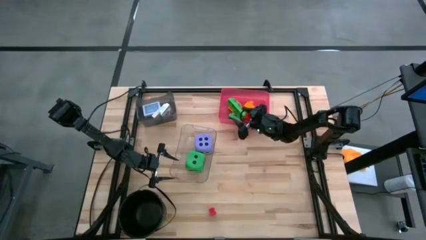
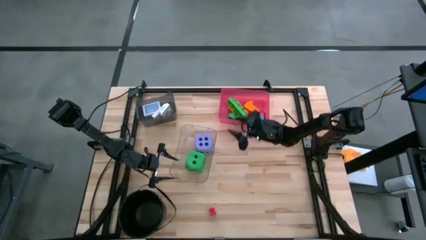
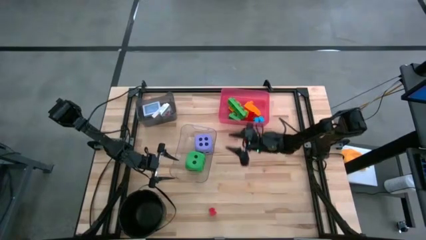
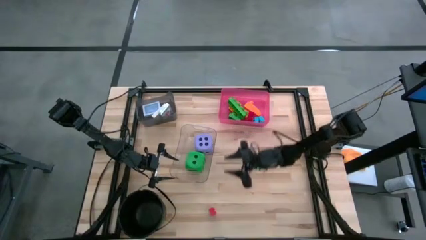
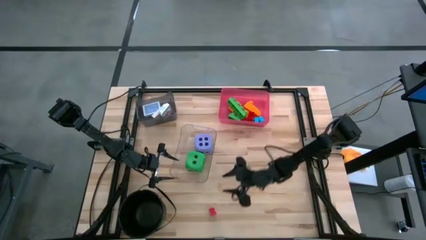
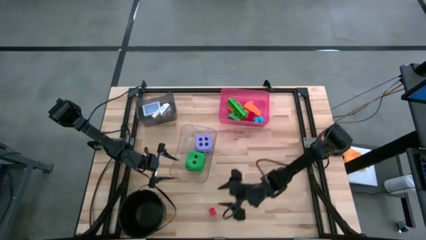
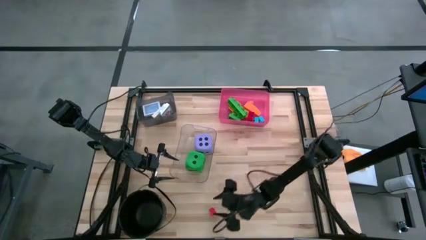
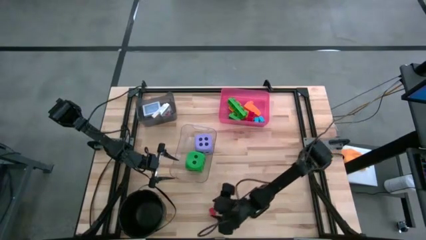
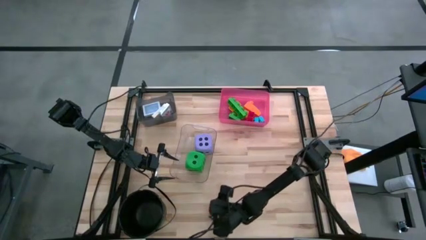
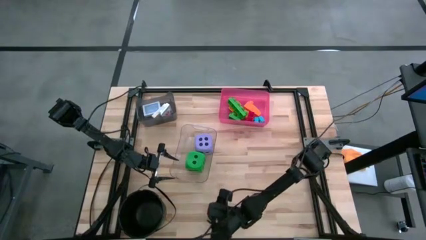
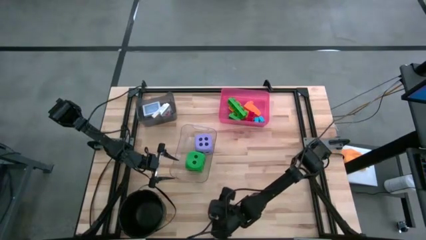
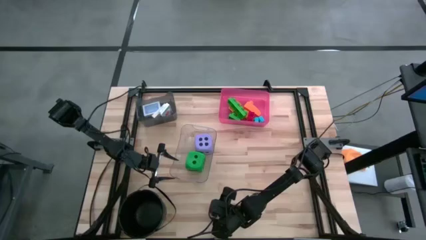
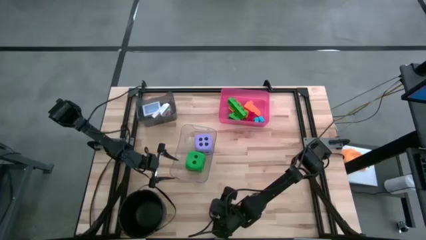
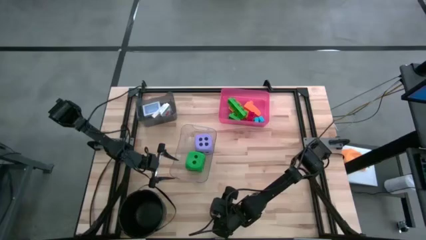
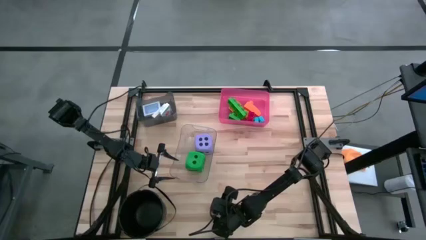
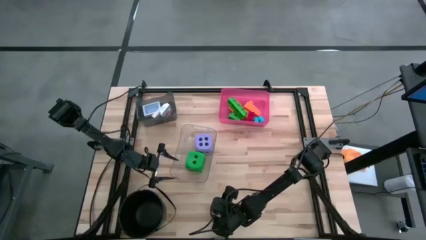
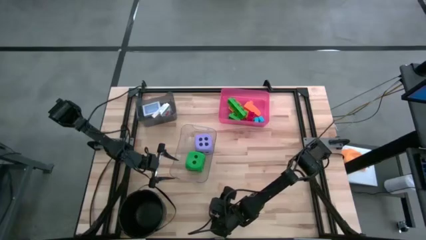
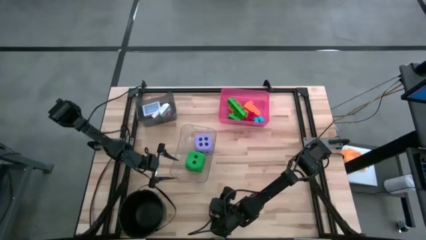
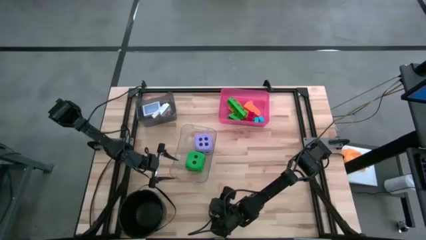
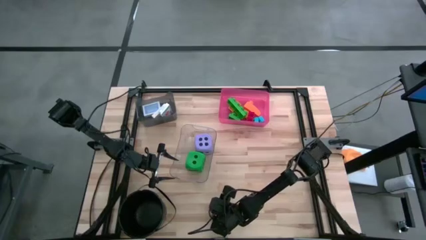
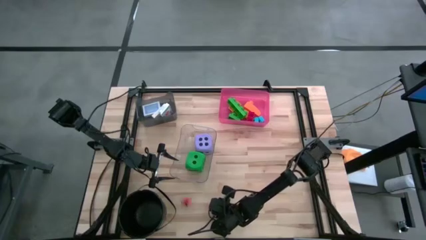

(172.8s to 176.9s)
Task: Pick & Place Toys
Put the red game piece into the pink bin

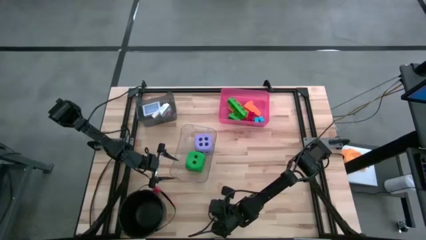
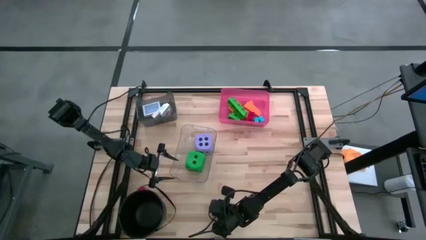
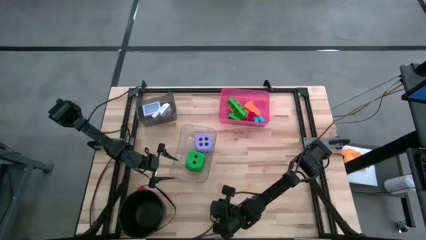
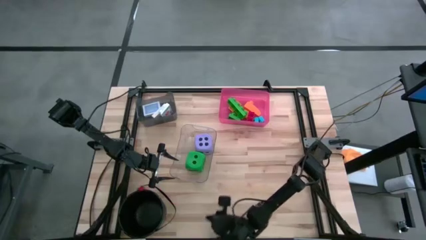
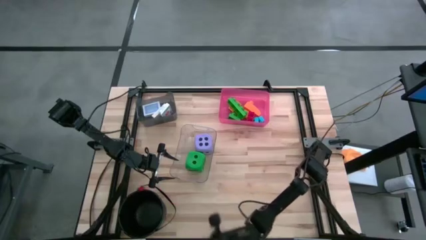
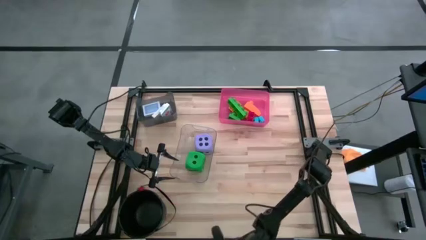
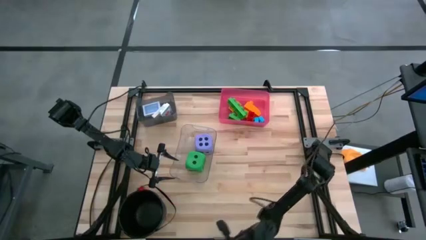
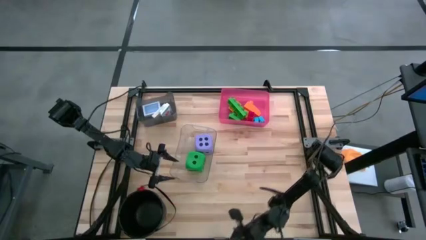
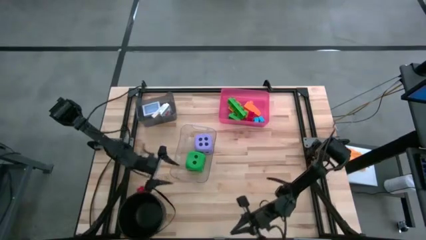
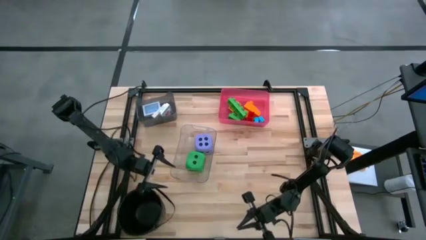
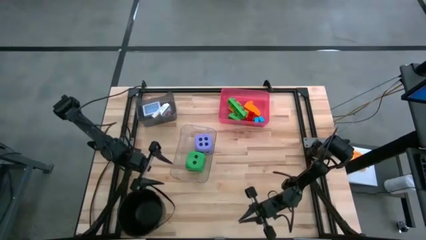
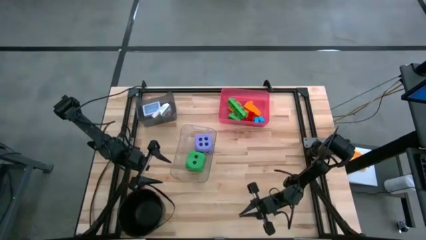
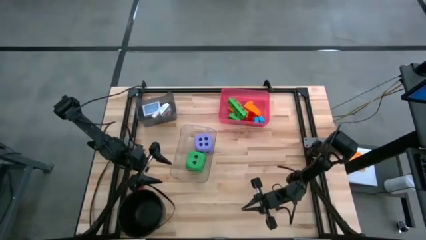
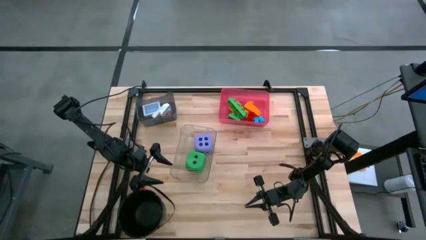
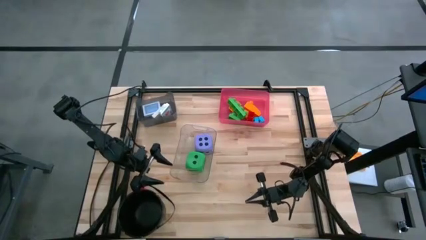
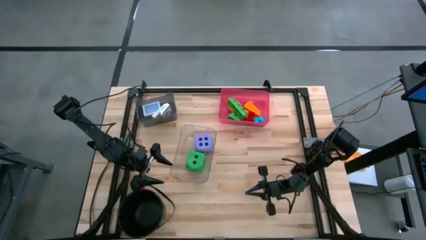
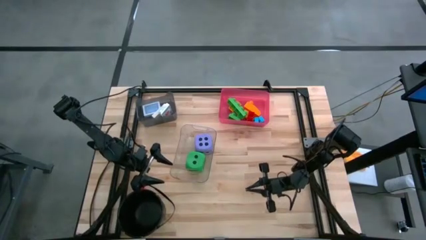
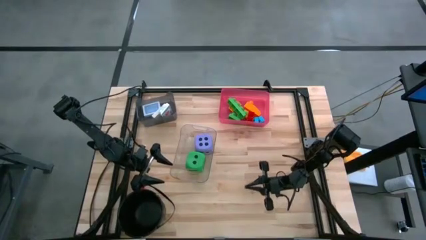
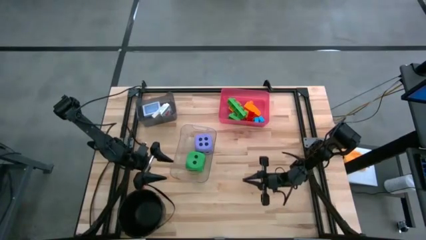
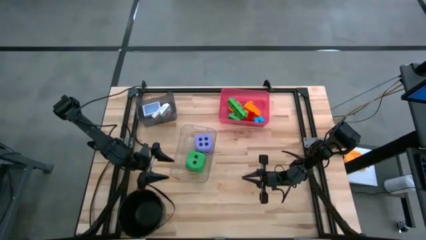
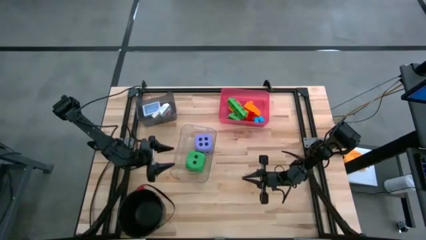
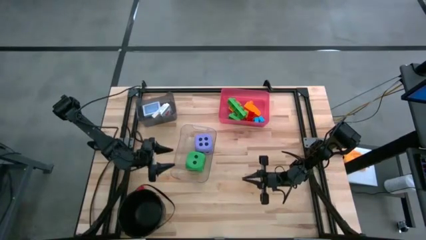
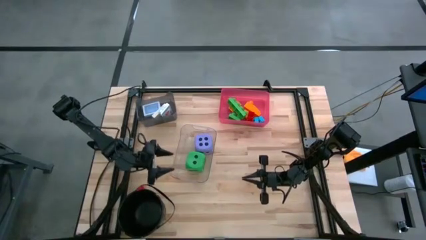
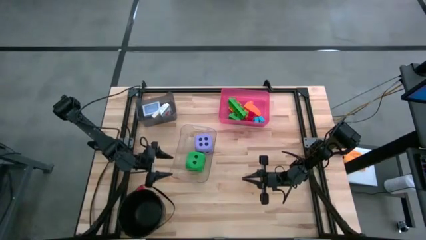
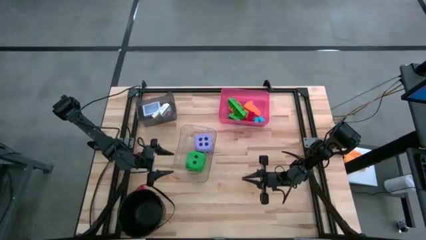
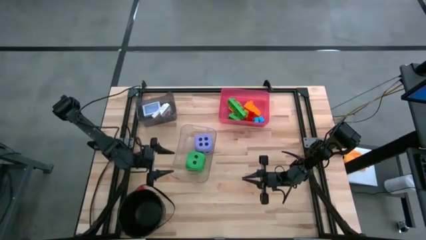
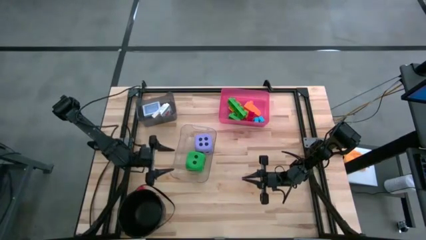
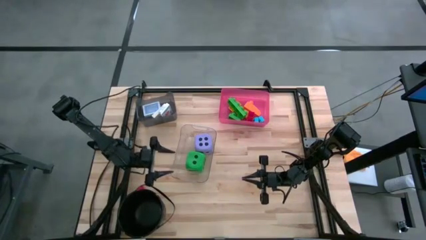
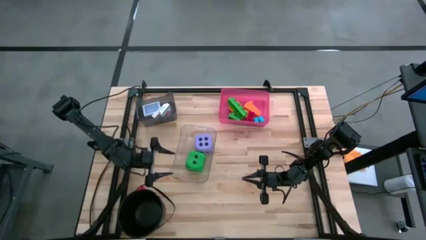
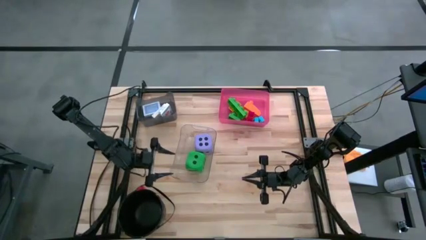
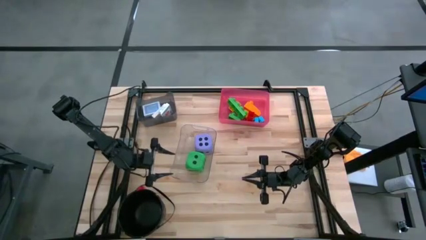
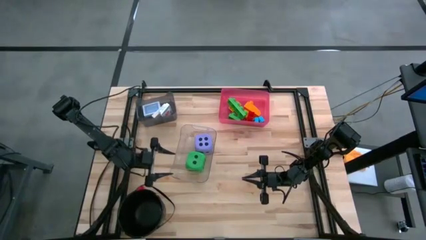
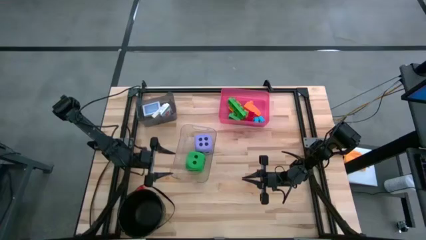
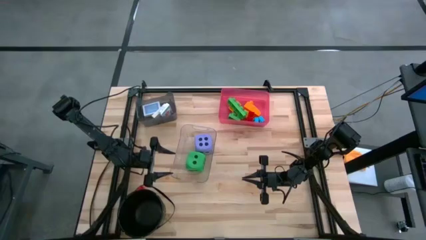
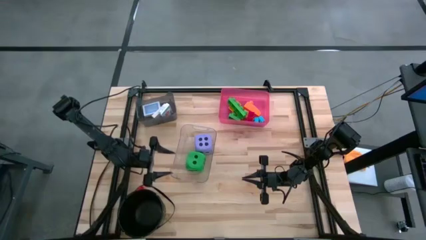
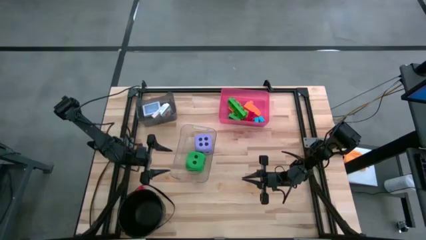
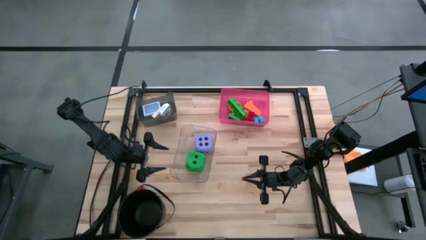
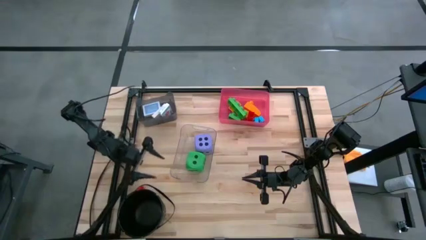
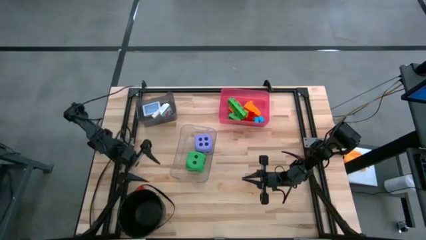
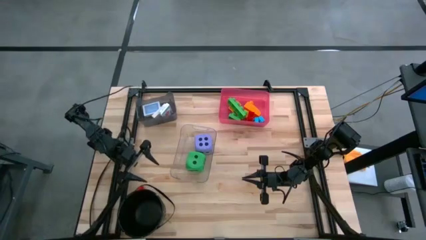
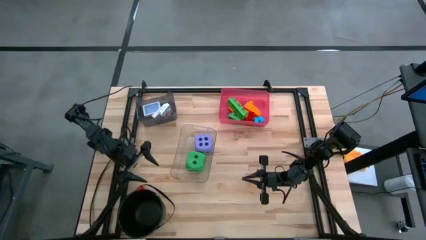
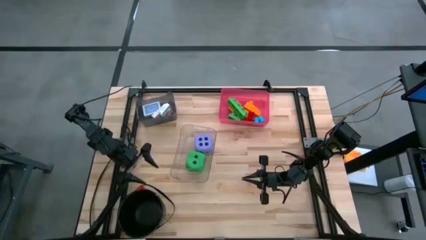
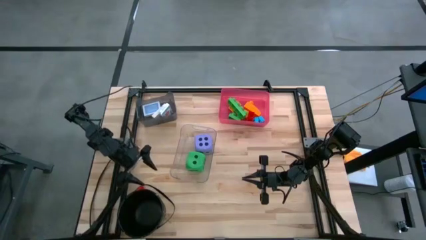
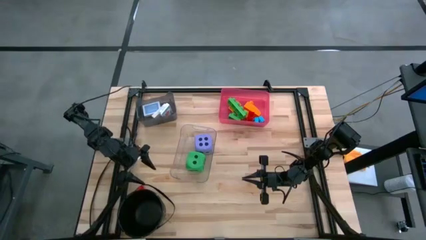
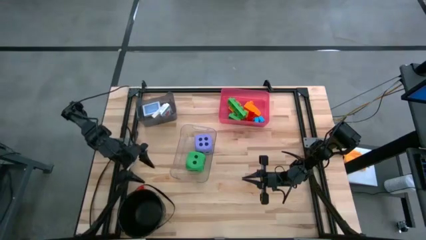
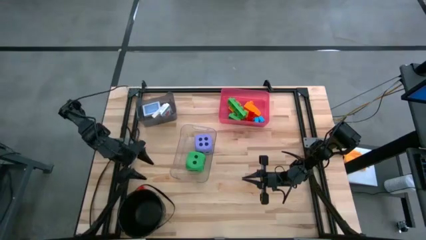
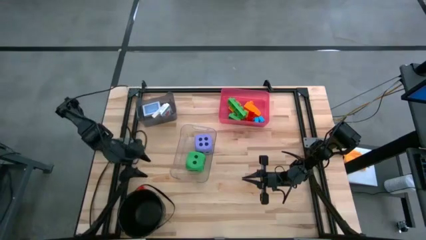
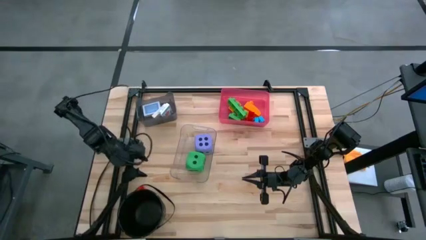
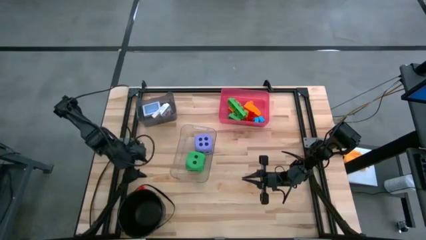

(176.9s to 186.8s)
Put the red game piece into the pink bin

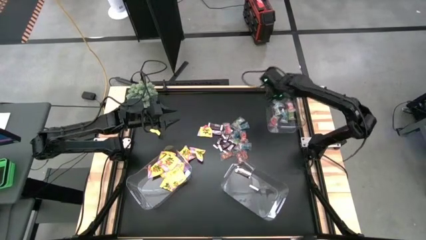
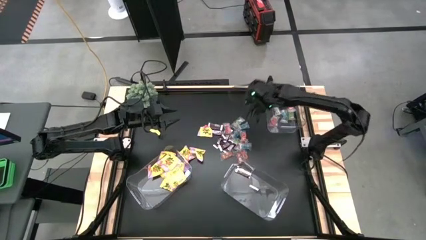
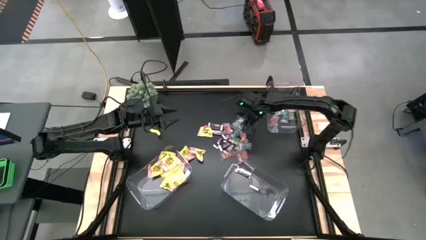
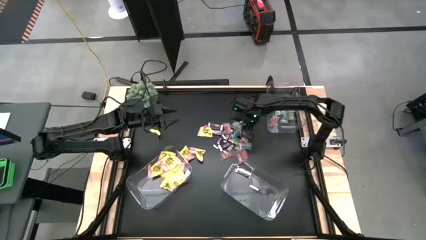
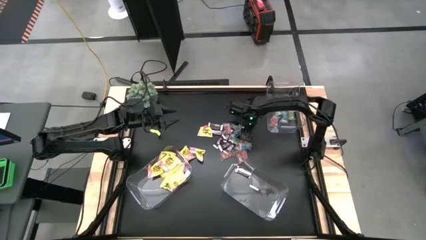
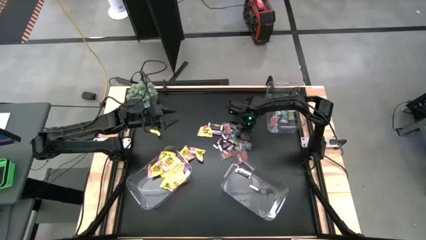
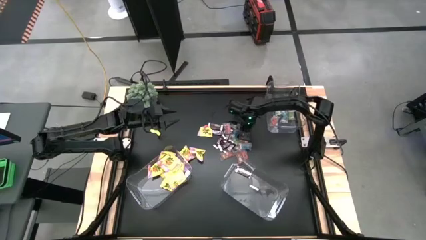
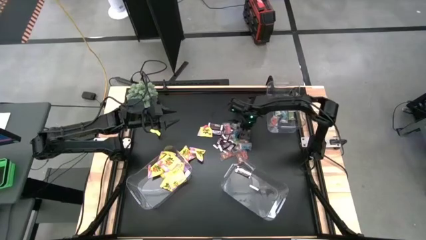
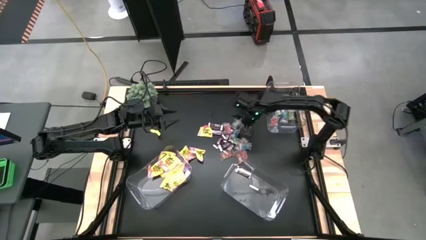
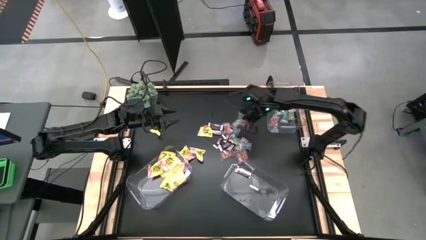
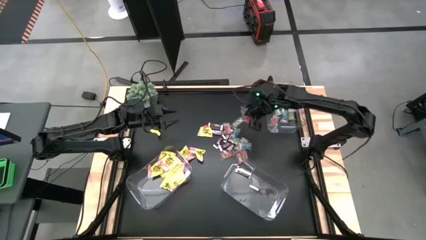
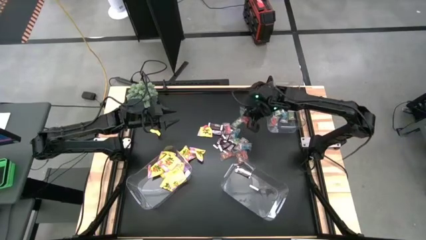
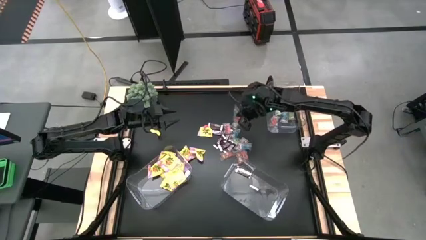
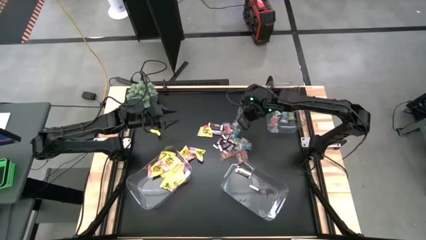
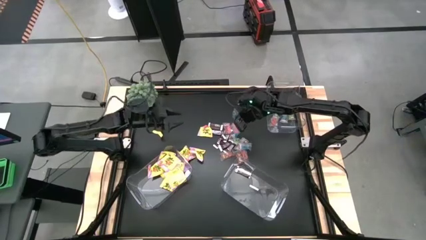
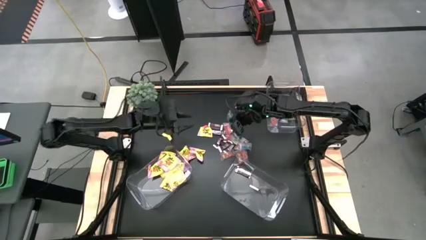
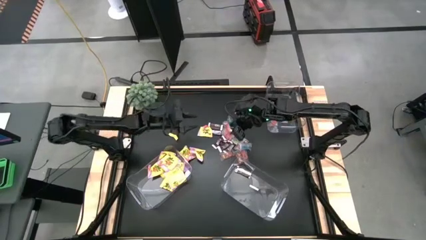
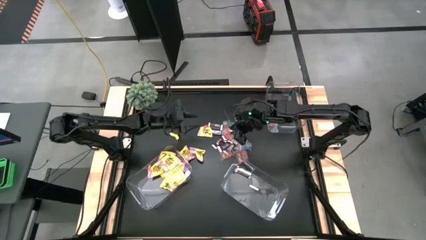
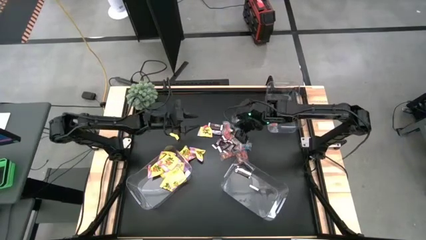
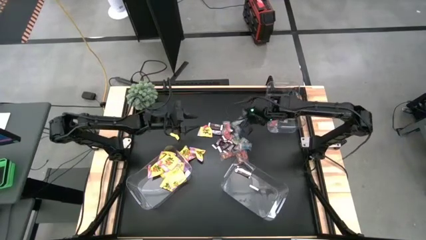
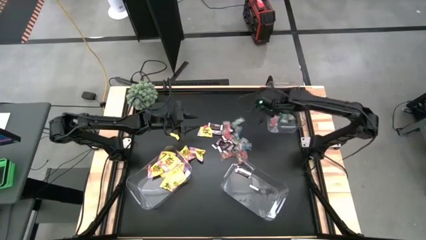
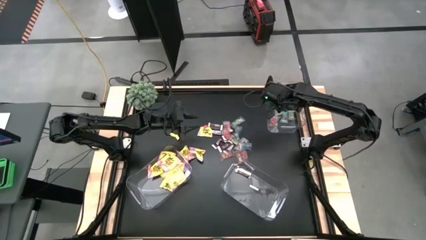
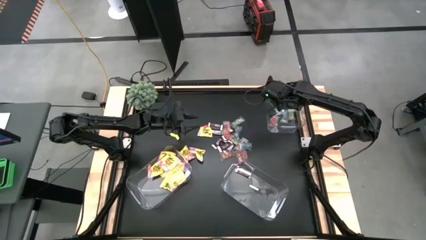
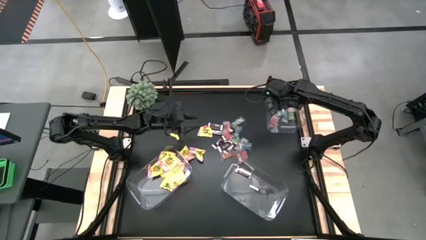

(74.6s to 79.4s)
Task: Sort candy
Put the blue candy in the top right transparent container
